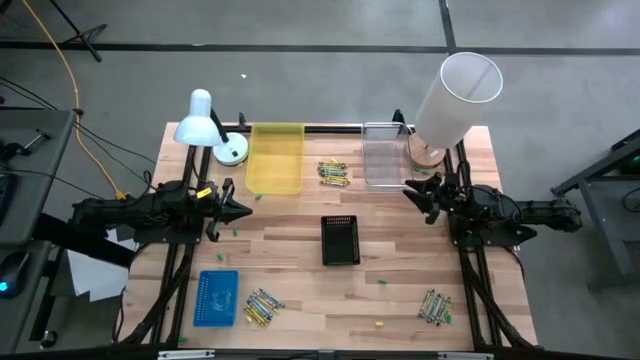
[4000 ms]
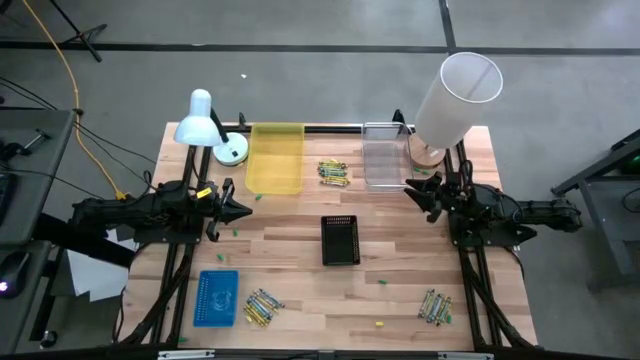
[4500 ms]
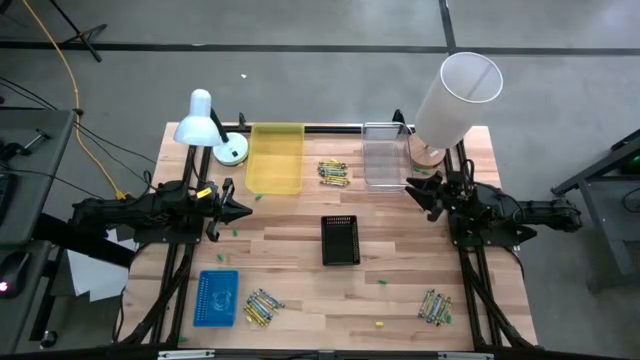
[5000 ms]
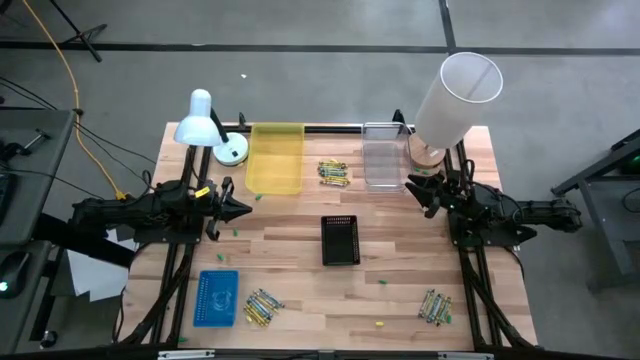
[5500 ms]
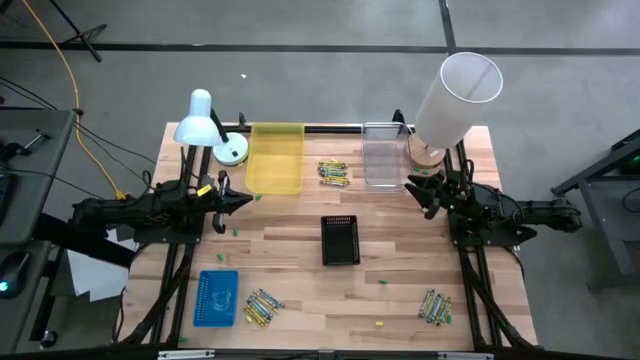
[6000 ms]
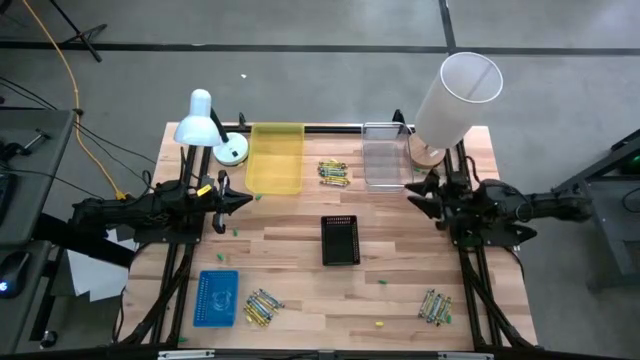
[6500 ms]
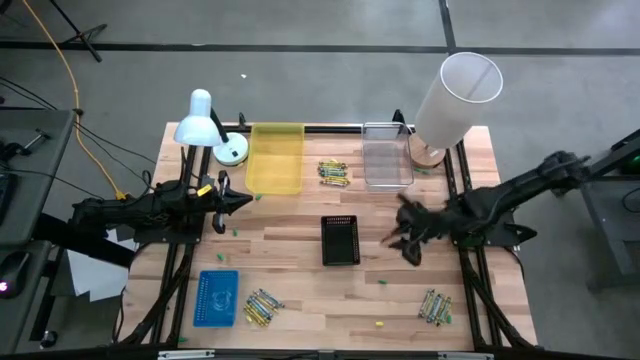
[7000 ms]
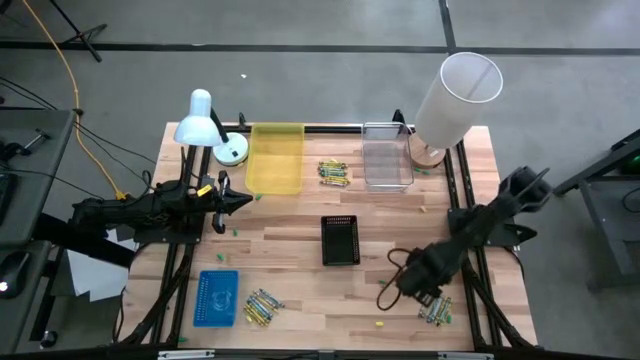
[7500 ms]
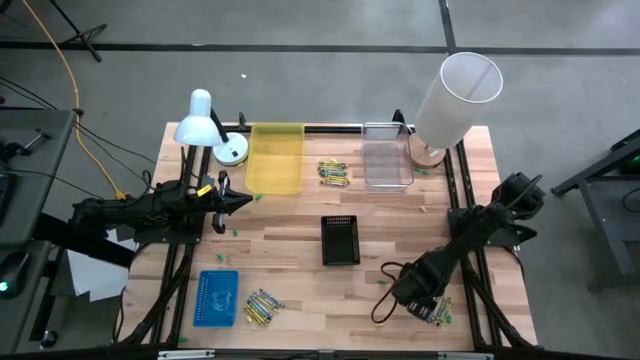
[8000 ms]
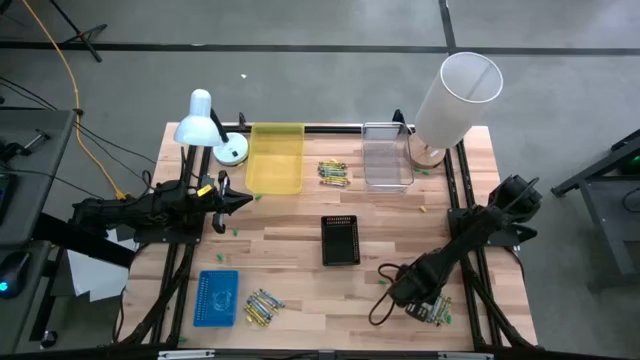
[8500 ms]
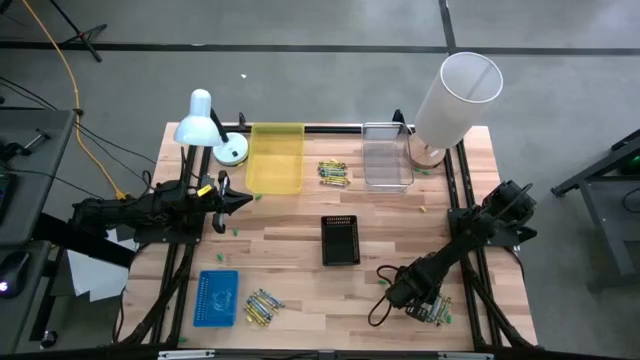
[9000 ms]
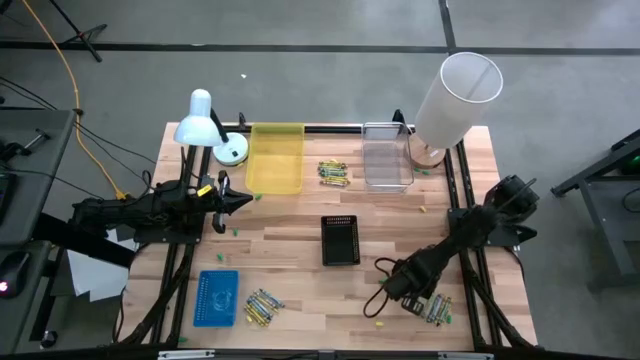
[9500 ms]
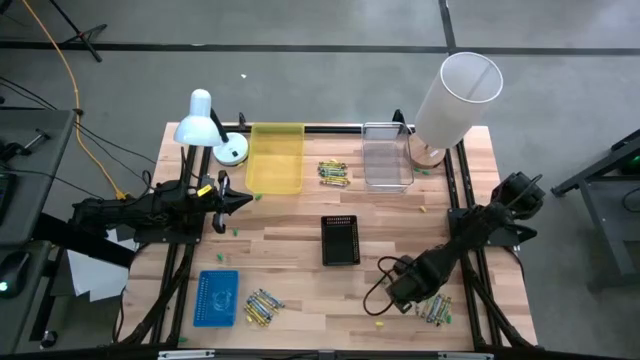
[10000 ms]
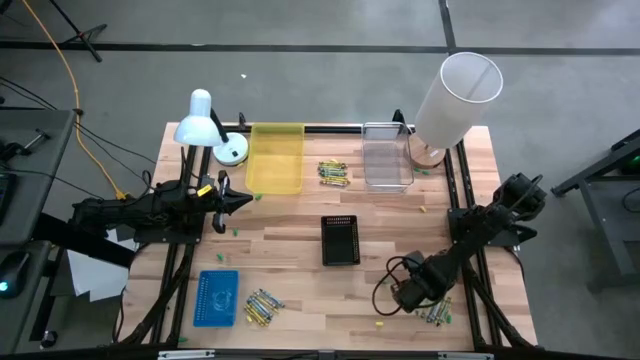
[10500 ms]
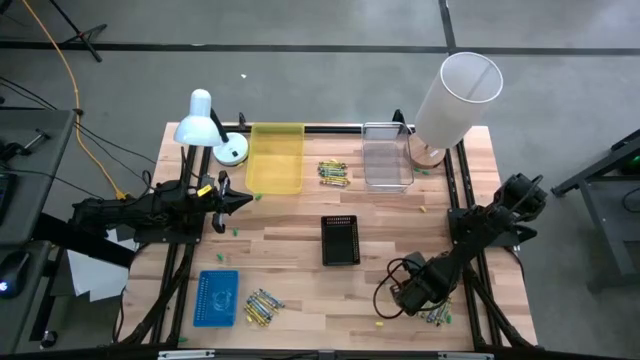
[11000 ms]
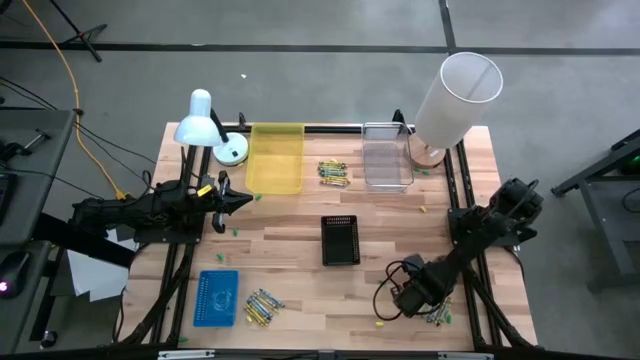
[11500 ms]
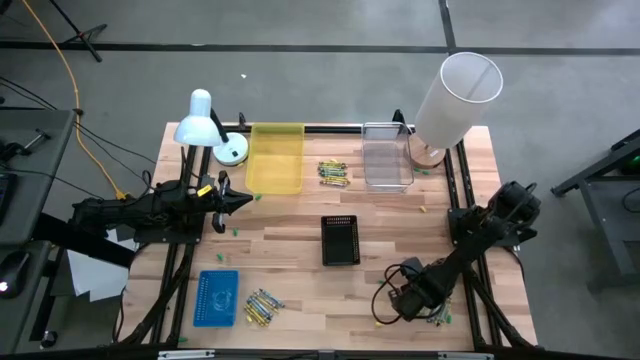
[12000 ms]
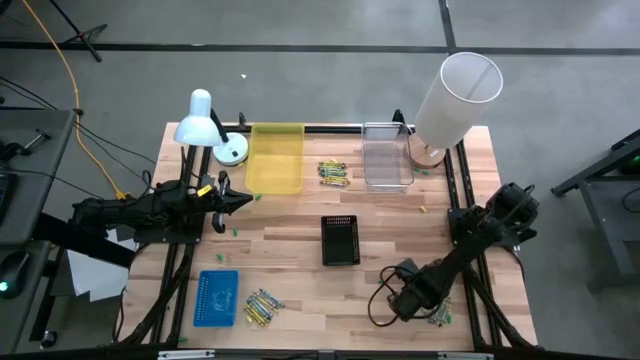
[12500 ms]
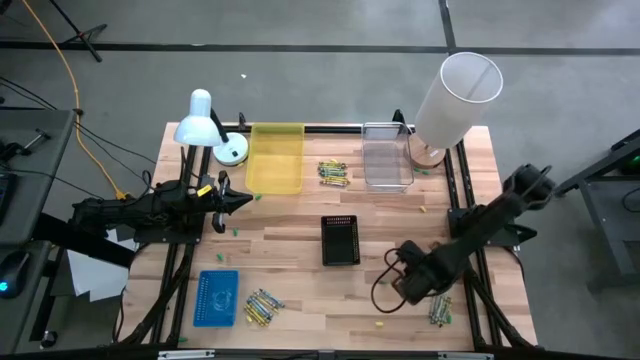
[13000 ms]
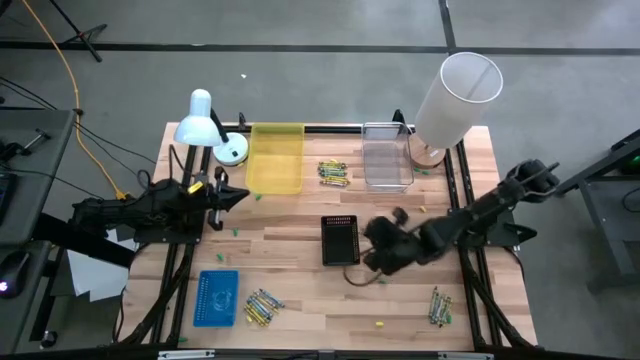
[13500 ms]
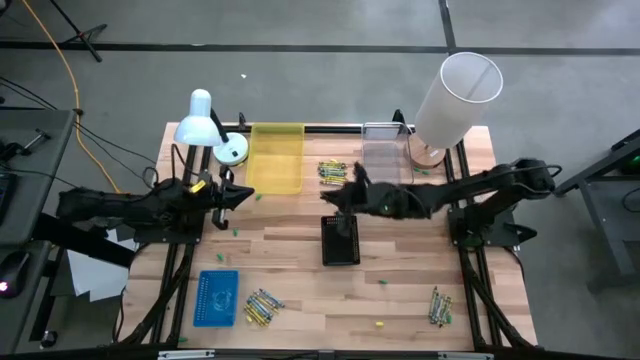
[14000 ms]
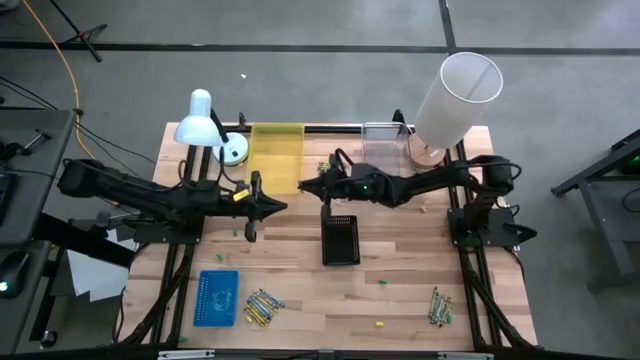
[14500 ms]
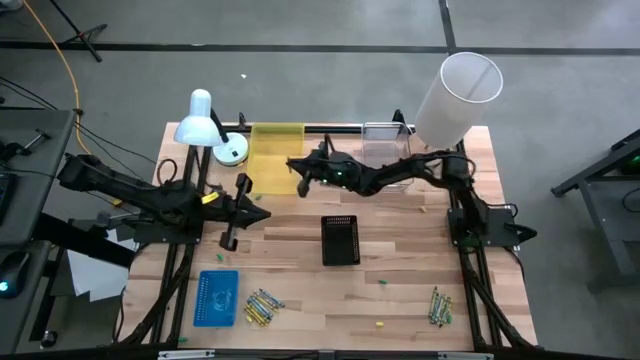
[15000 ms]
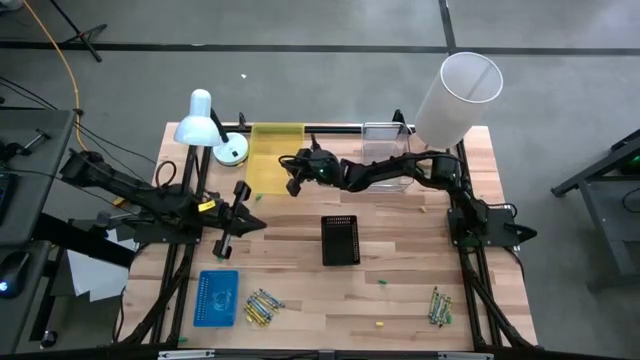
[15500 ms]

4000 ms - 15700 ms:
Task: Sort crayons
Put the gray crayon into the yellow transparent bin

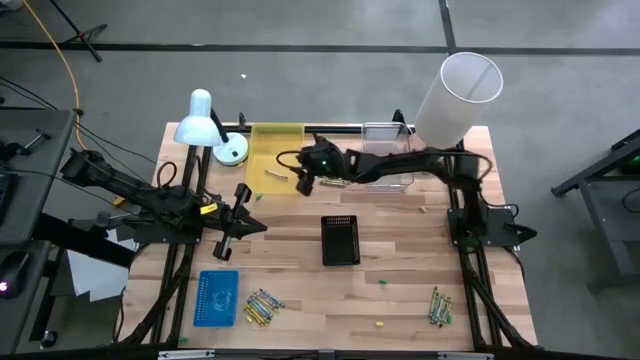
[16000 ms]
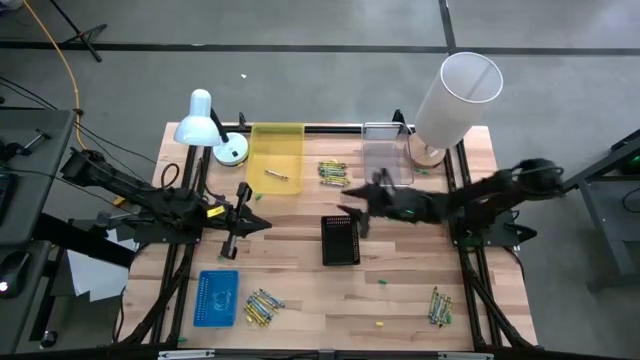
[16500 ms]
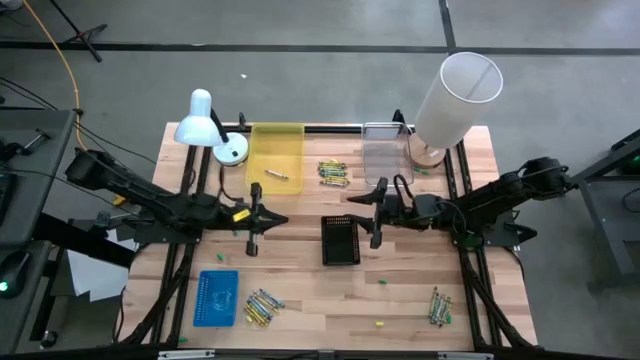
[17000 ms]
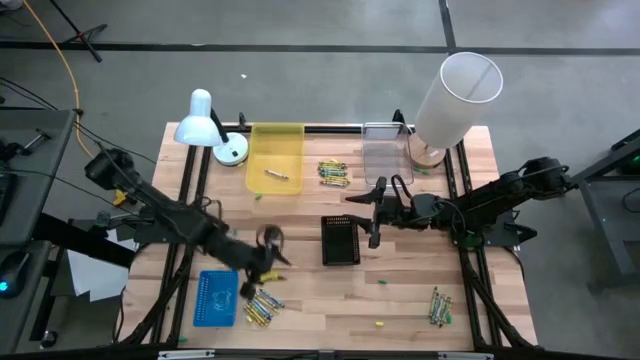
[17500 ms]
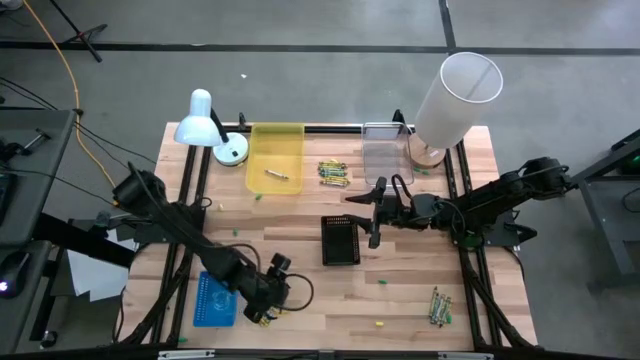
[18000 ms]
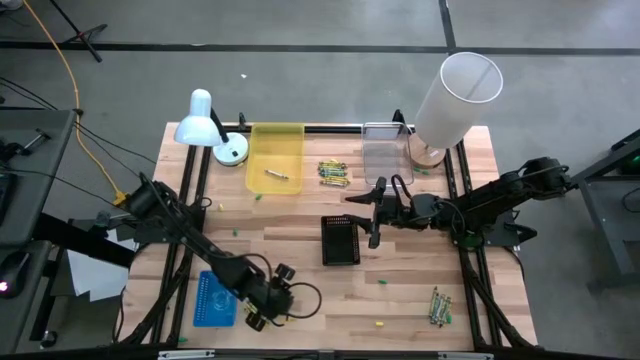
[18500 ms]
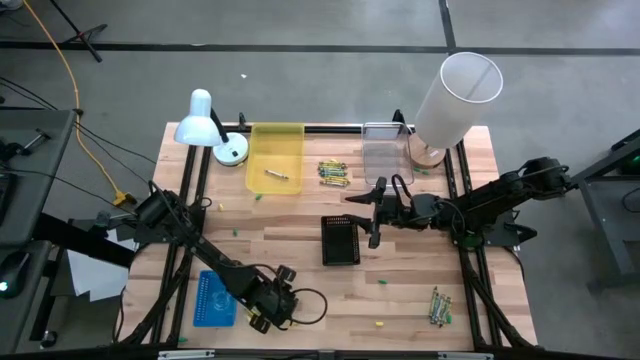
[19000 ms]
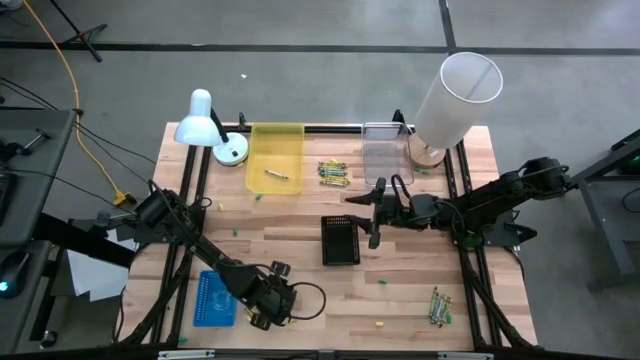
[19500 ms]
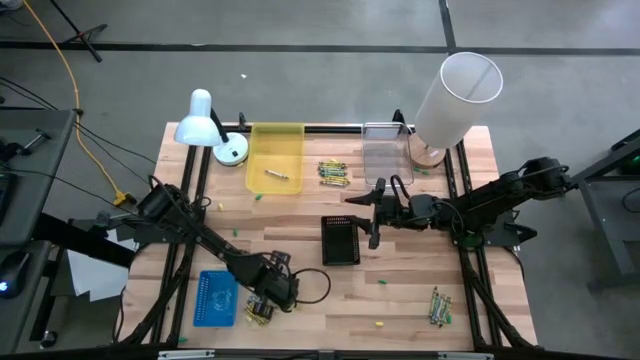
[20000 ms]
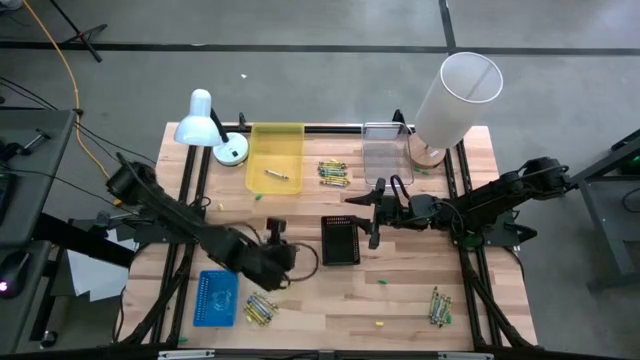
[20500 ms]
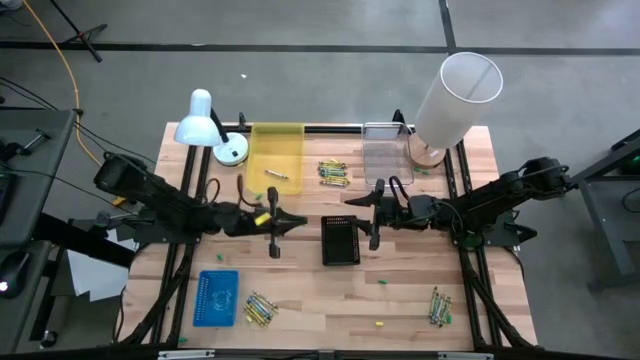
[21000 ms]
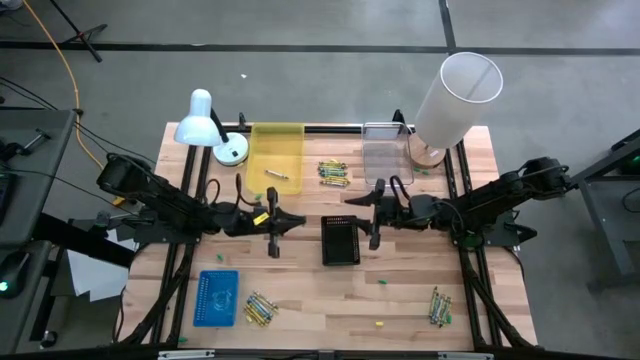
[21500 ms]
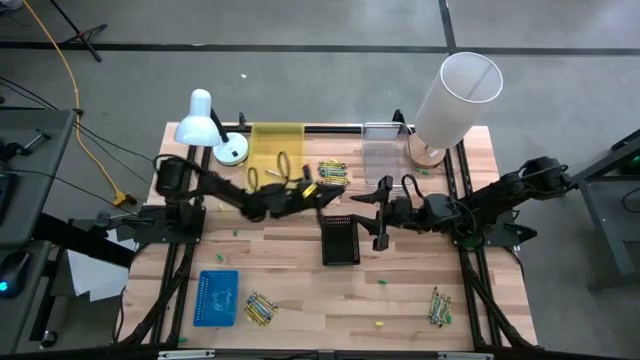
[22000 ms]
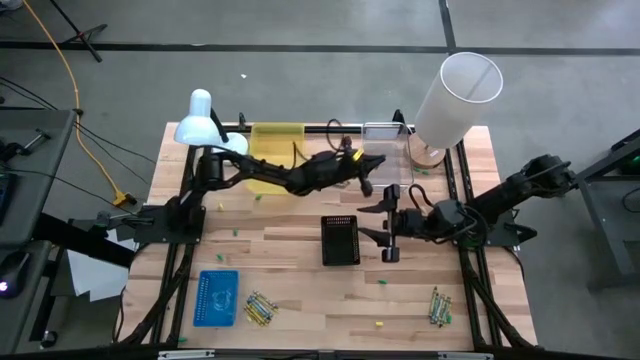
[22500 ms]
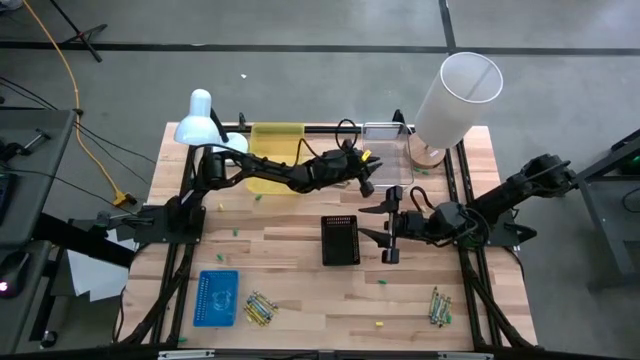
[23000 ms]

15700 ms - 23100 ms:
Put the blue crayon into the transparent bin

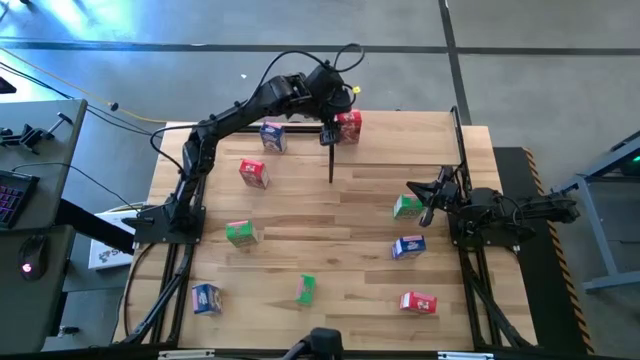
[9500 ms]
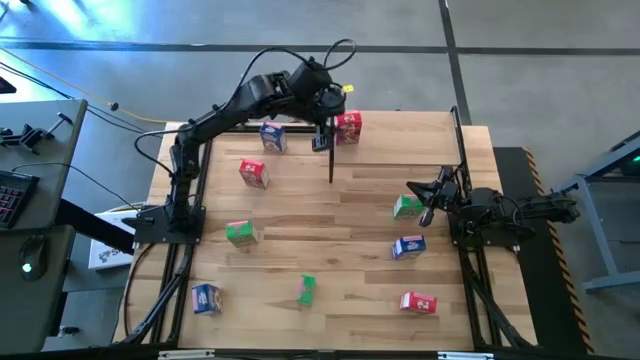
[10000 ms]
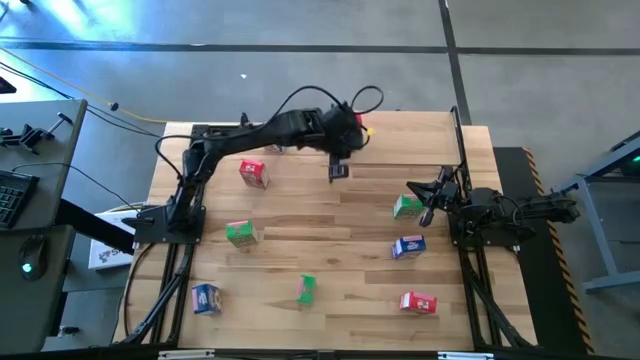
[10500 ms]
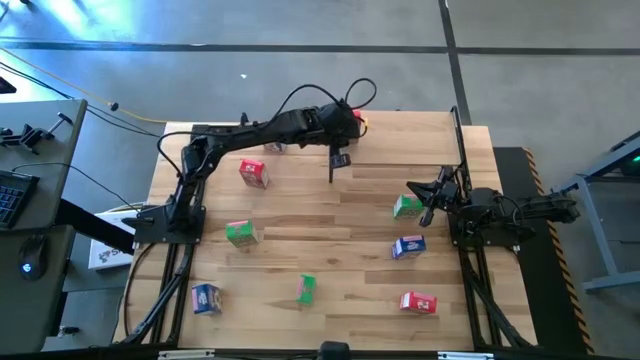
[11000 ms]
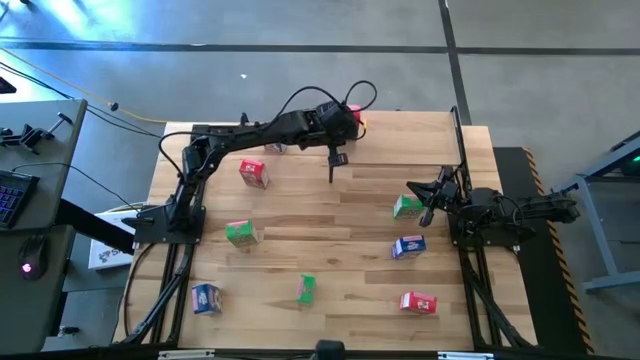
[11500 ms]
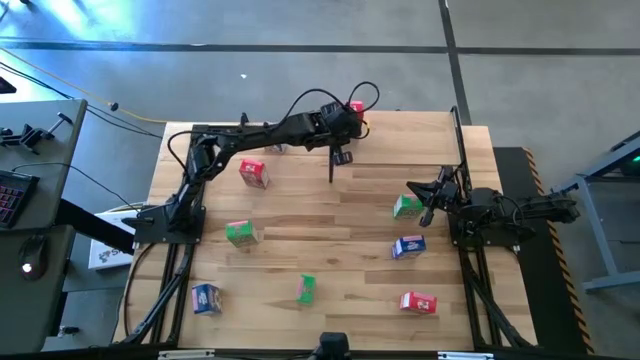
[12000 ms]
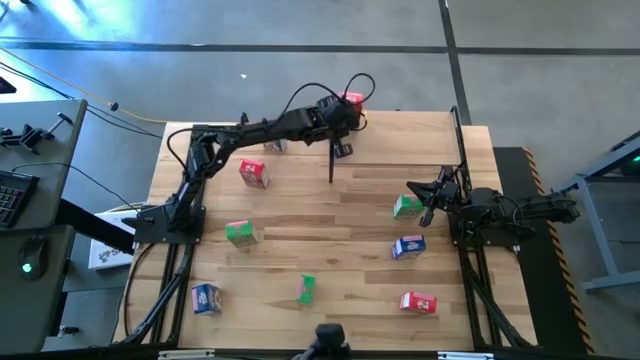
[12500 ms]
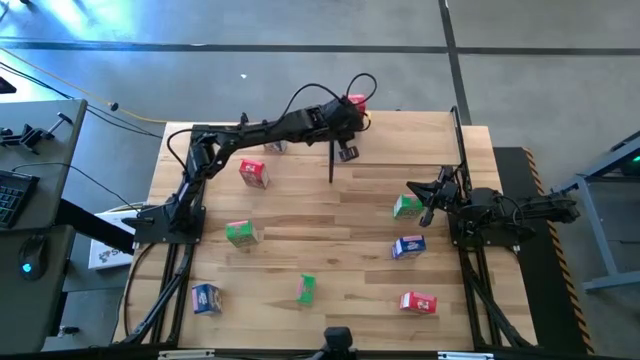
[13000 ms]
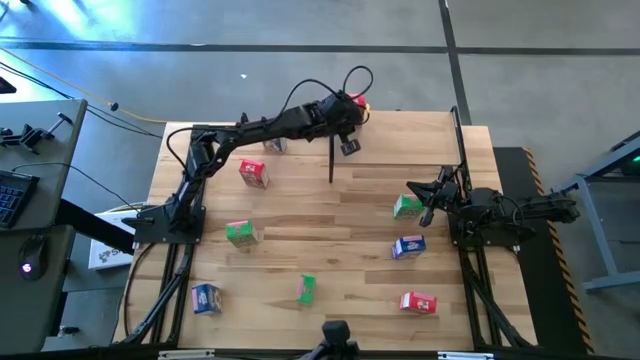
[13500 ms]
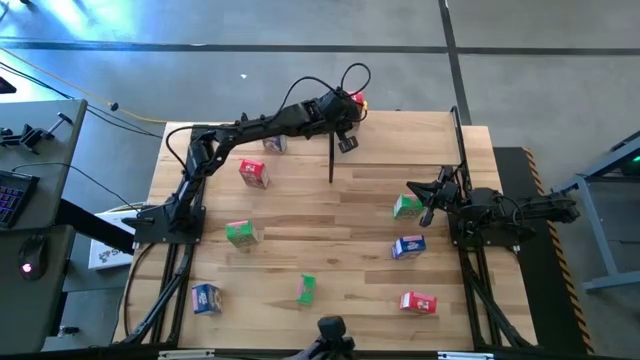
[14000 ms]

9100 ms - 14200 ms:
Task: Stack cereal on shelf
Adjust the red cereal box
